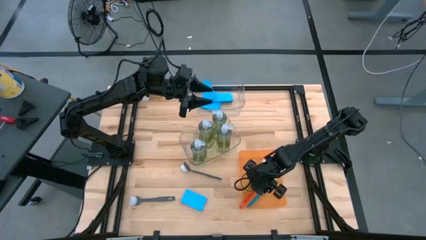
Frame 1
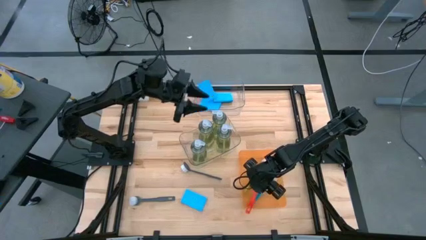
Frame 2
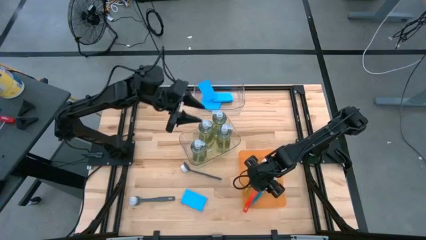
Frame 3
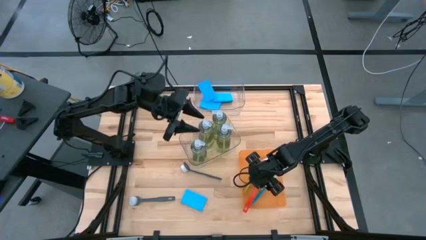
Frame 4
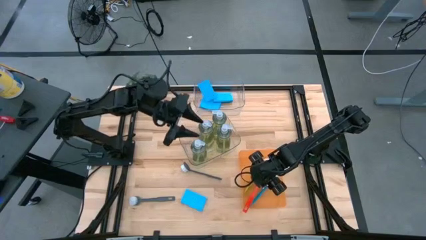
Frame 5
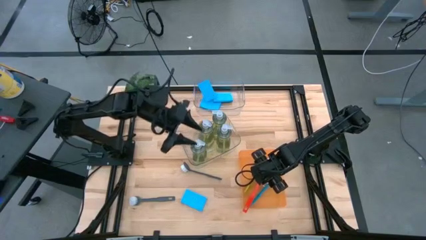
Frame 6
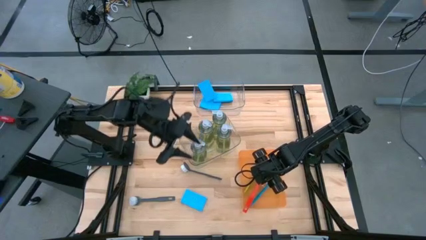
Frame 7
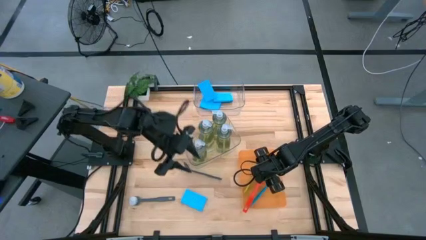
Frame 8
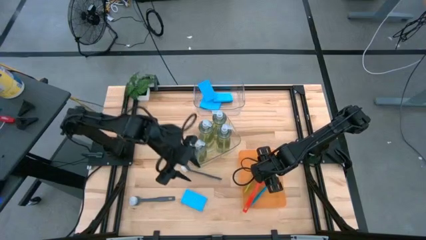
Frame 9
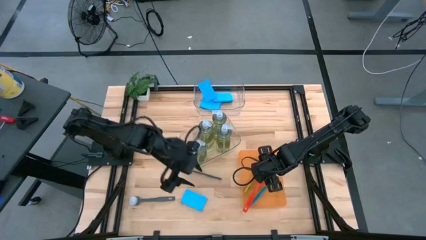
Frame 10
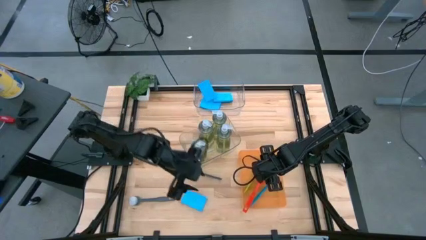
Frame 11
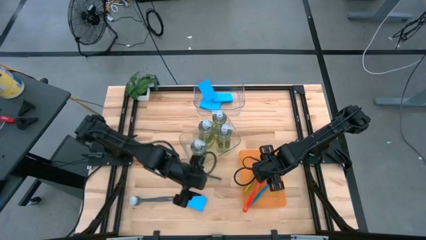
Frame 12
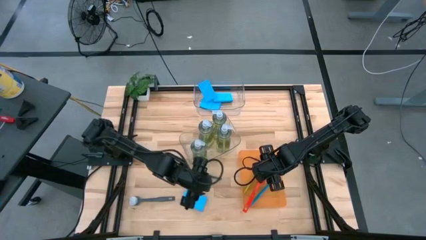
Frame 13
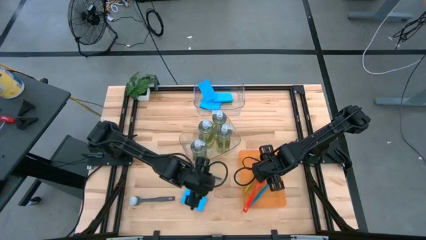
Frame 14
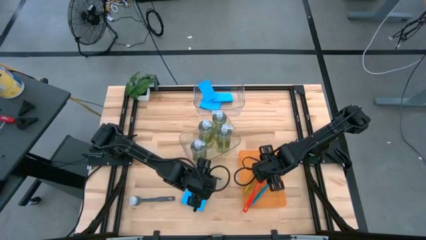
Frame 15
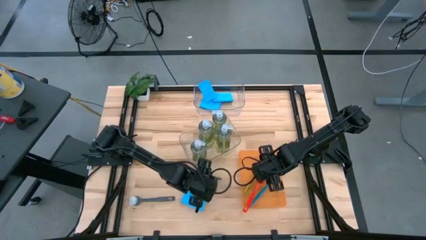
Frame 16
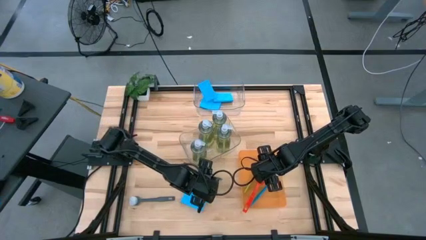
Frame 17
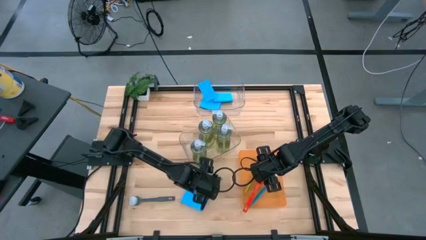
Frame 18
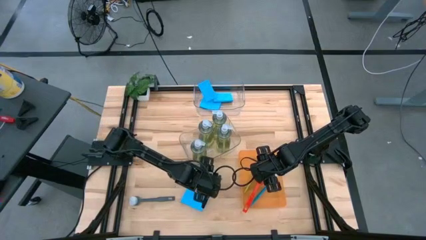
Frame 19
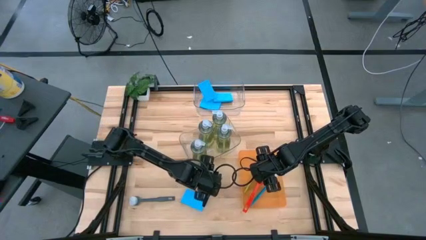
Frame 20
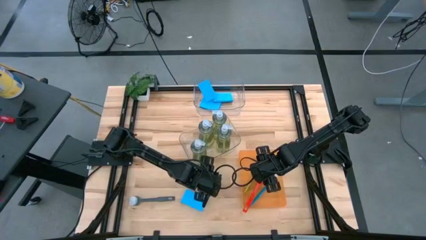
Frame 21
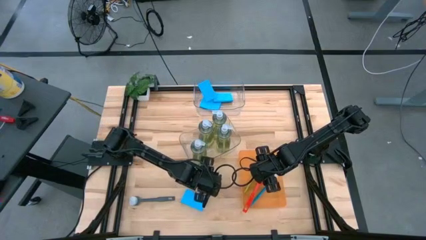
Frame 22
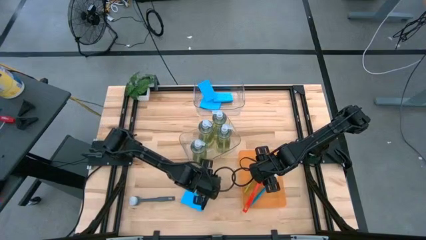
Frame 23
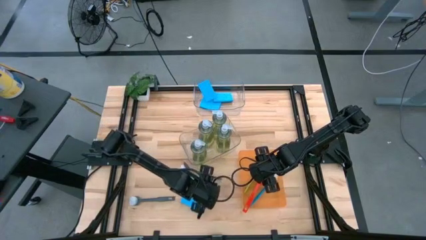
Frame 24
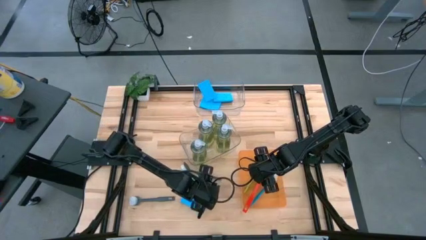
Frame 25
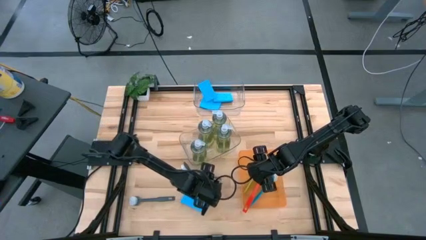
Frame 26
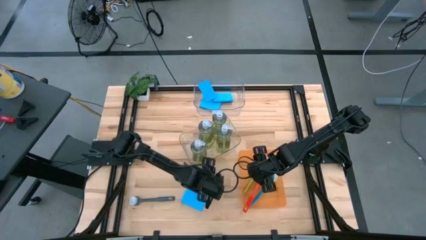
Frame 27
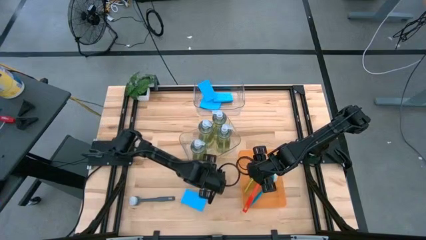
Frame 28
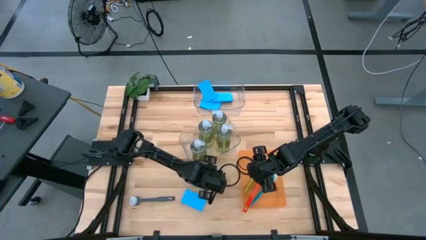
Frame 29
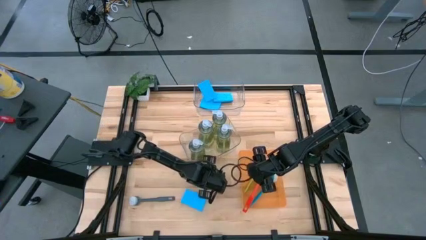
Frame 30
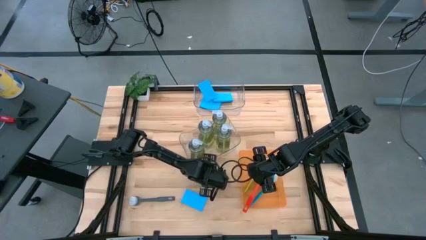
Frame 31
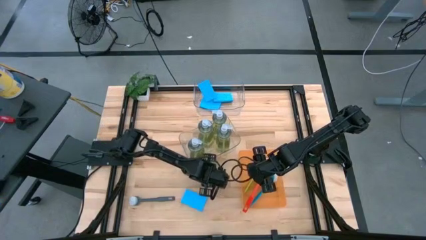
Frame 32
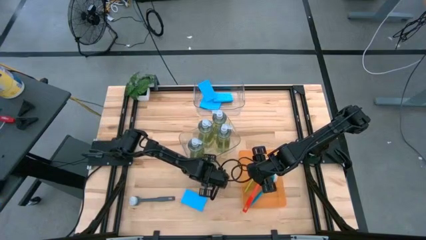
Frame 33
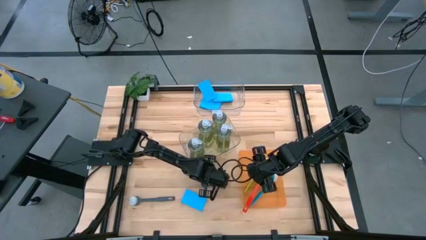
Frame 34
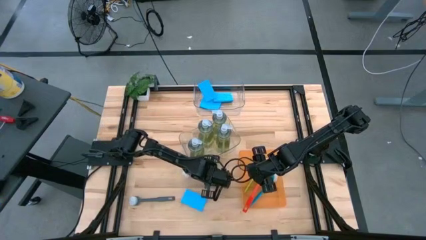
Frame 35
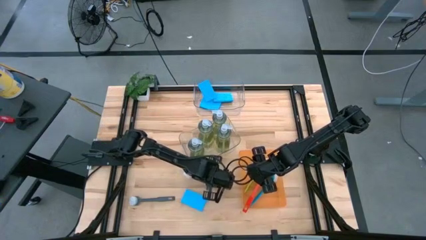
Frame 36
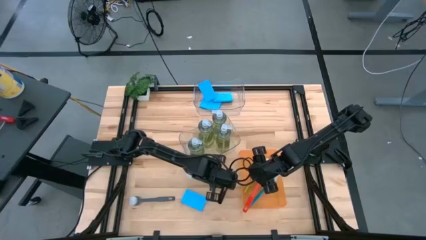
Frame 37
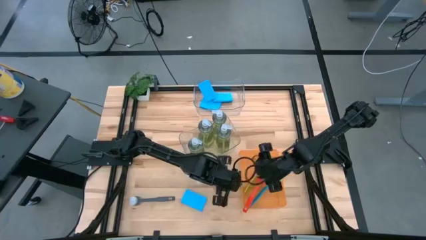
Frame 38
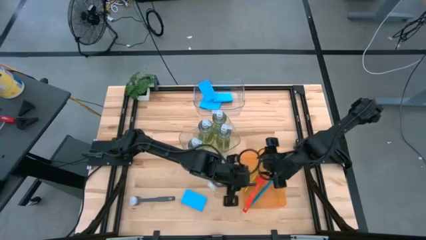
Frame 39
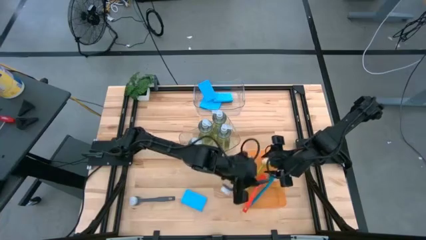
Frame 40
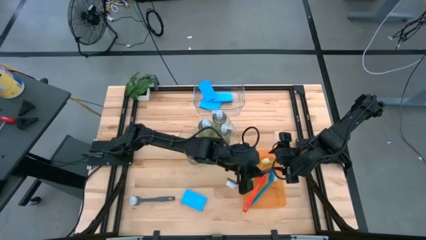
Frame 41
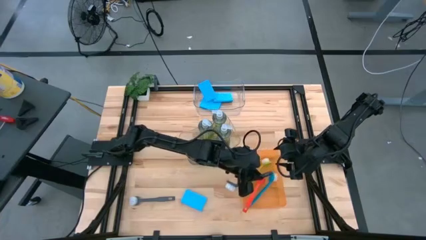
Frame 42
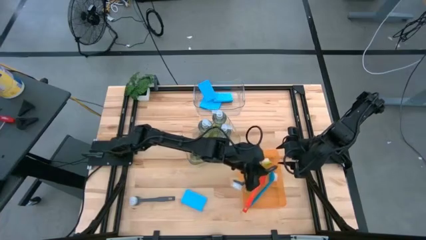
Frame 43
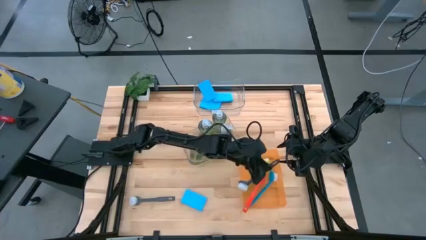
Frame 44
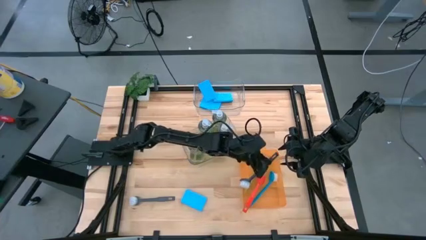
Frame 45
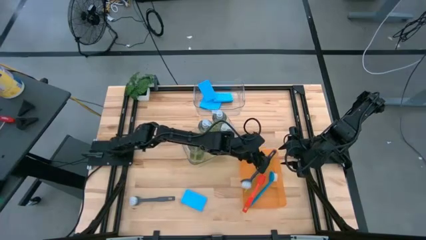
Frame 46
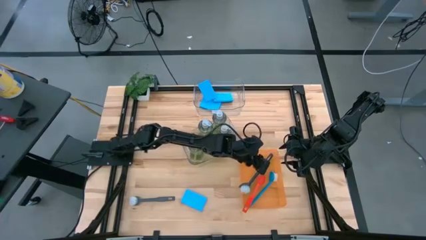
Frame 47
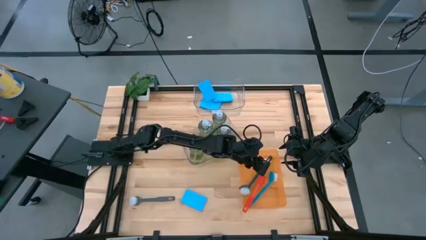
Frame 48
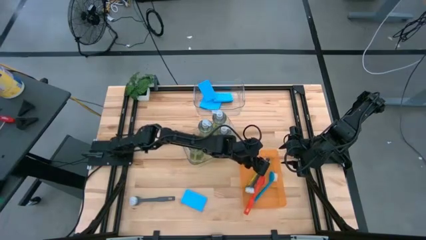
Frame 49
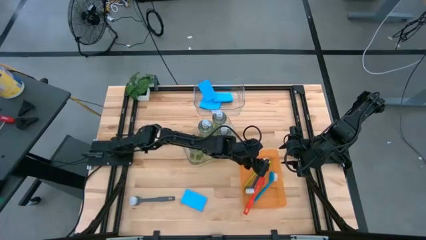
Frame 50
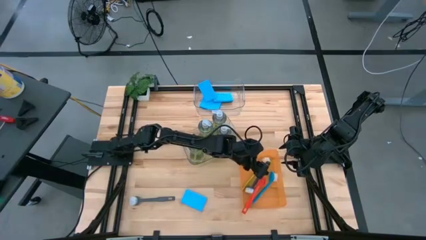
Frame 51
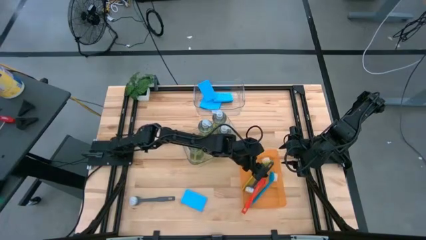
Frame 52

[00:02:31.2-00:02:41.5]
Task: Pick & Place Kitchen Sink Supplies
Put the gray dish brush into the orange bin

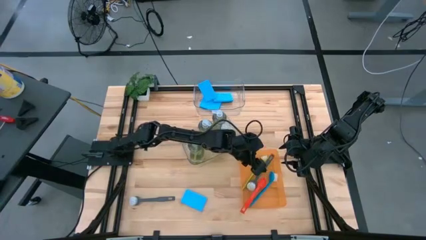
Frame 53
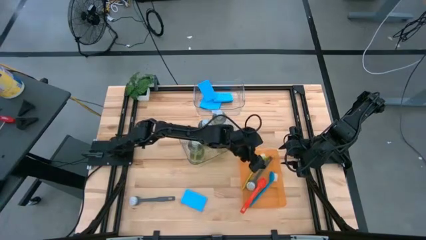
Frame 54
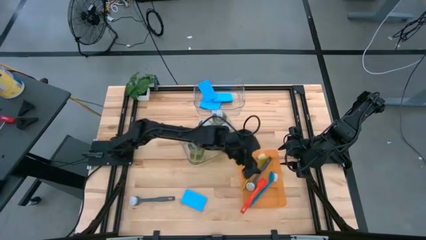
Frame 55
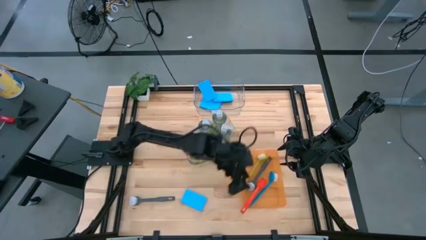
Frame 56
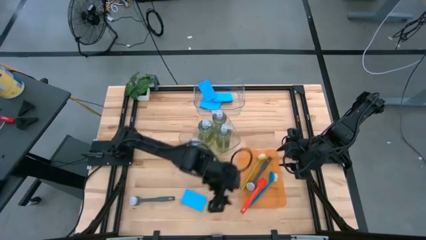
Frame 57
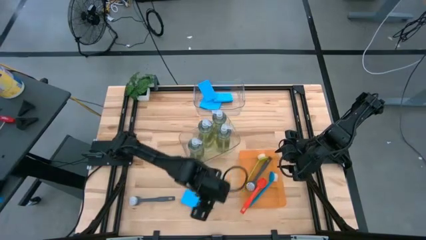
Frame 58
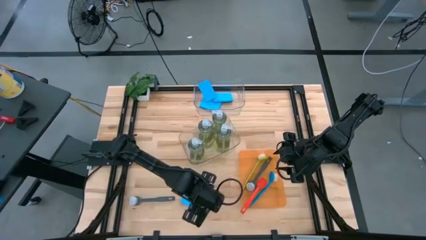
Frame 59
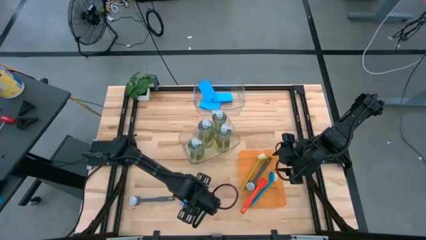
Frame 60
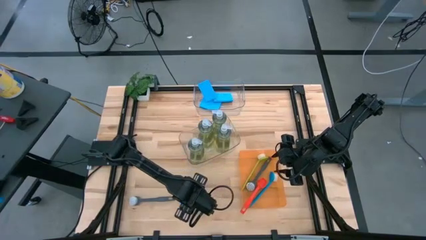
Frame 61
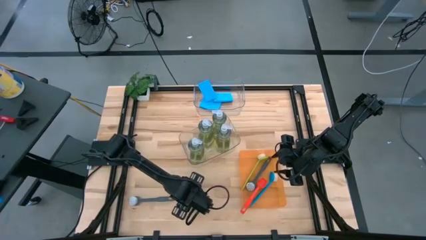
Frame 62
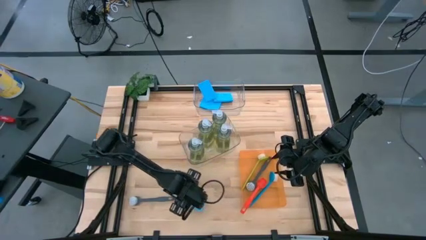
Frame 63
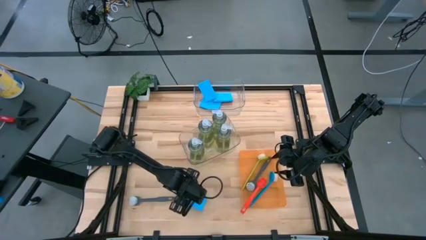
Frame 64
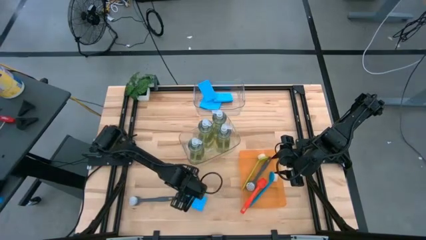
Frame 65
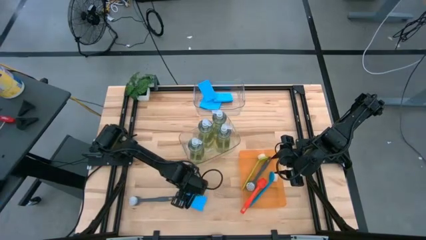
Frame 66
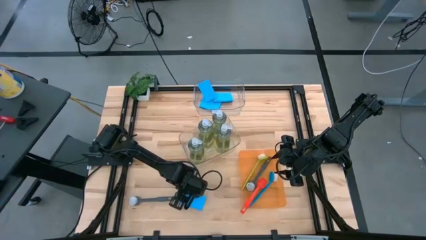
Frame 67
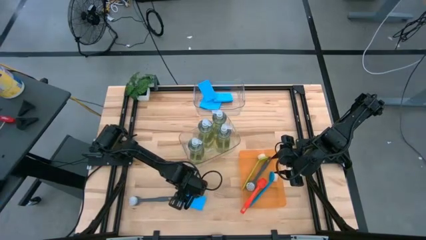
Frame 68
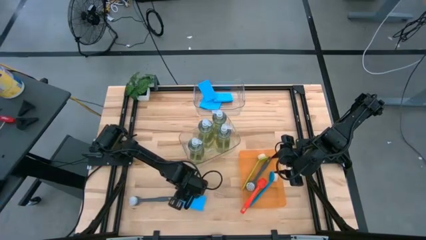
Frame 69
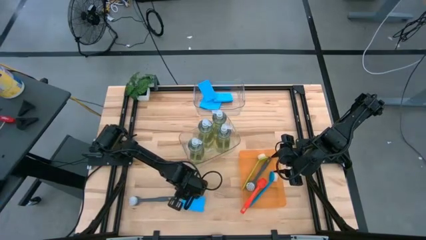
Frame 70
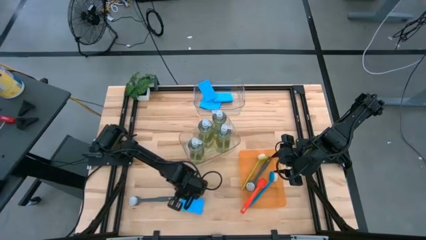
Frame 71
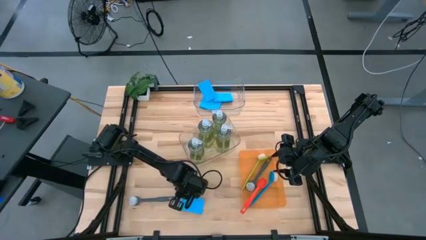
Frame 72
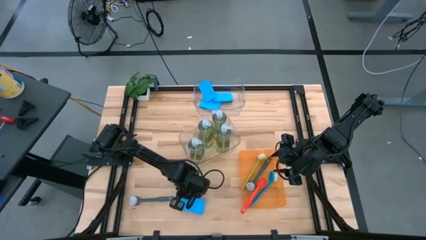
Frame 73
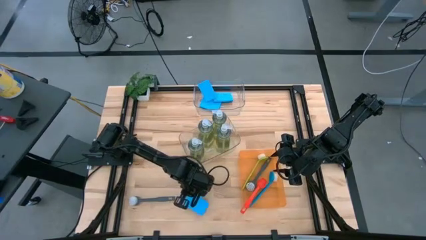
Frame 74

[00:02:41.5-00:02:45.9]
Put the blue sponge into the top transparent bin
